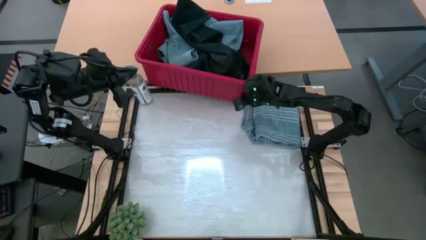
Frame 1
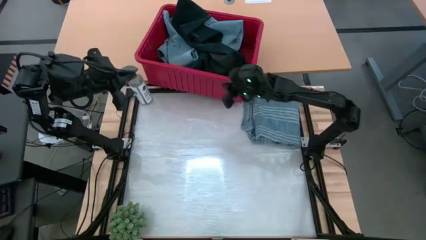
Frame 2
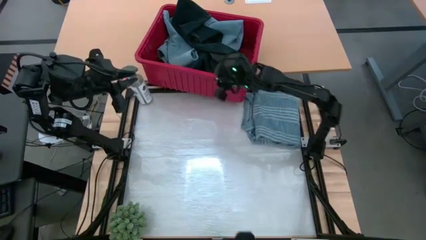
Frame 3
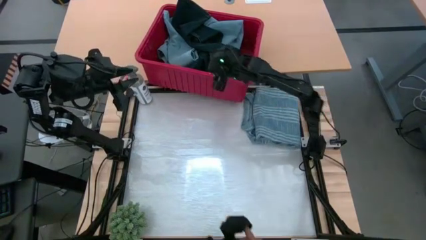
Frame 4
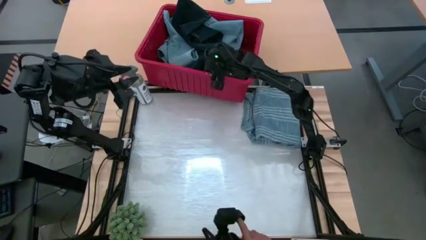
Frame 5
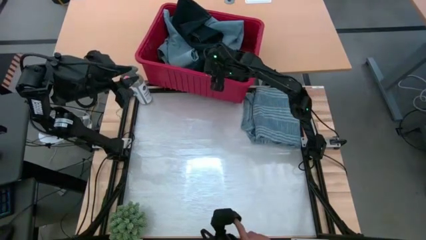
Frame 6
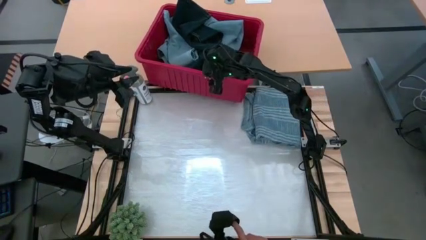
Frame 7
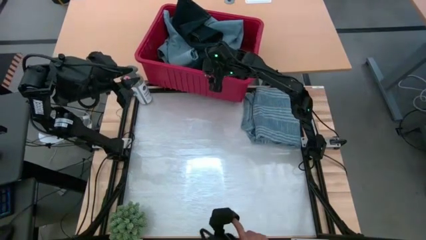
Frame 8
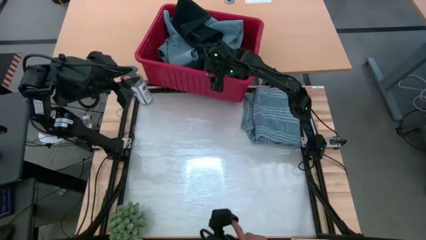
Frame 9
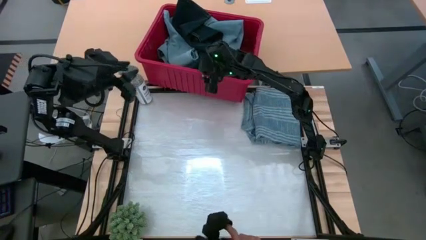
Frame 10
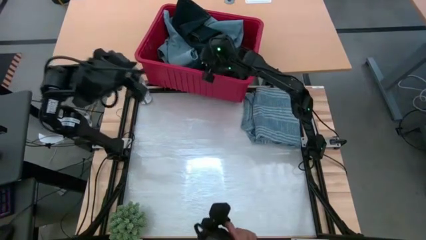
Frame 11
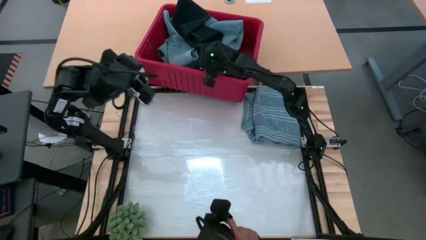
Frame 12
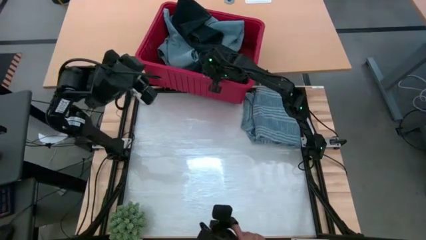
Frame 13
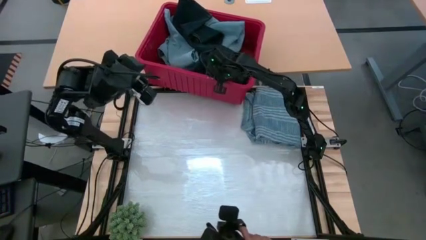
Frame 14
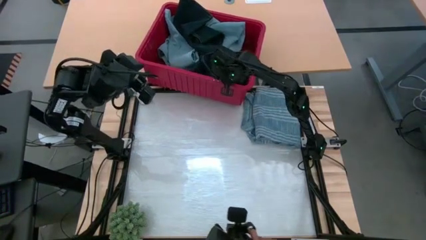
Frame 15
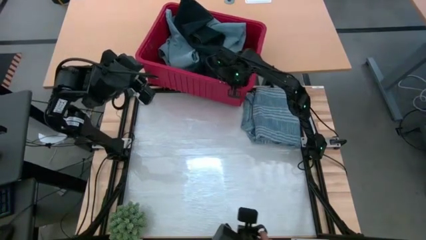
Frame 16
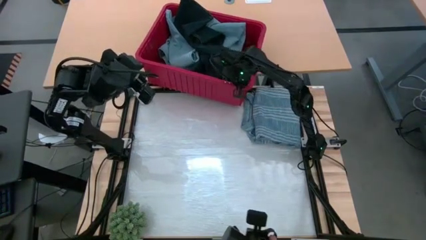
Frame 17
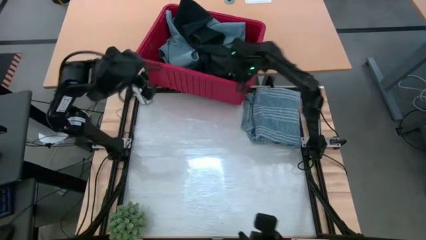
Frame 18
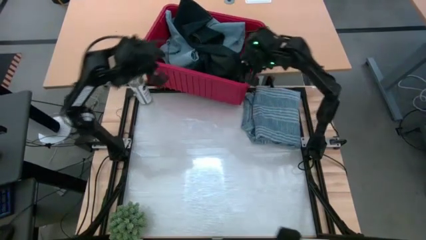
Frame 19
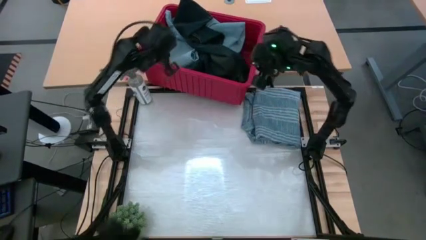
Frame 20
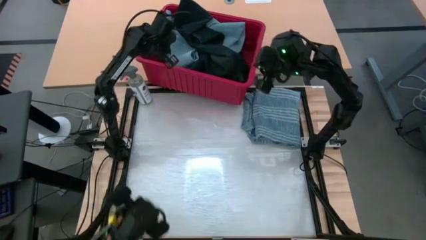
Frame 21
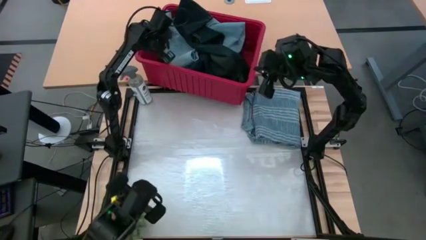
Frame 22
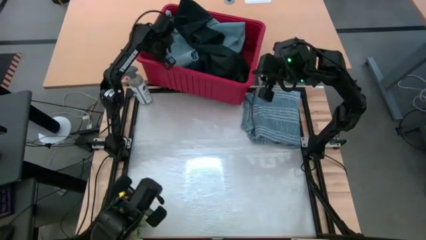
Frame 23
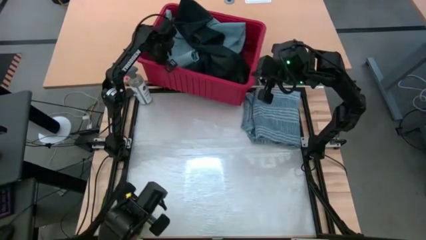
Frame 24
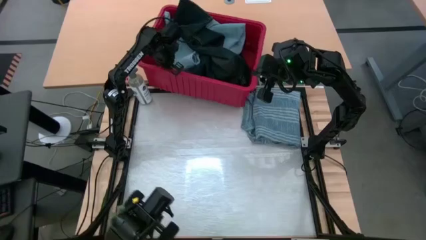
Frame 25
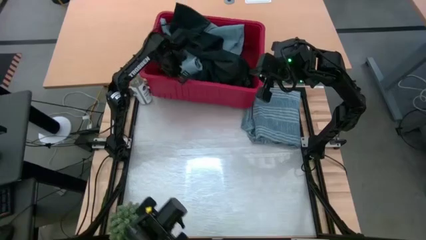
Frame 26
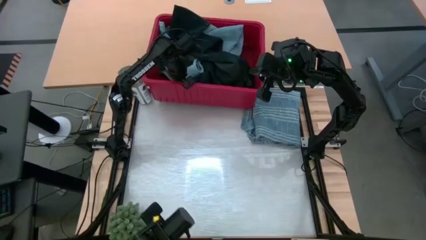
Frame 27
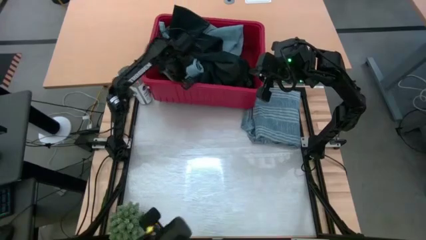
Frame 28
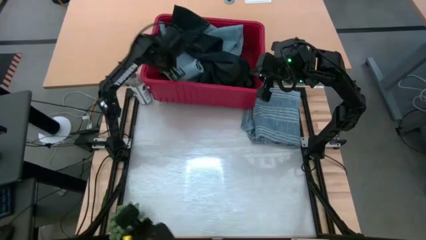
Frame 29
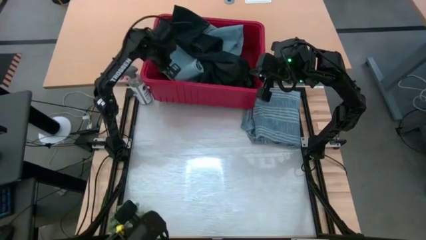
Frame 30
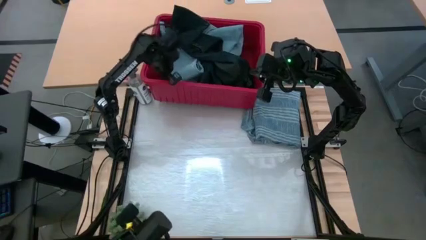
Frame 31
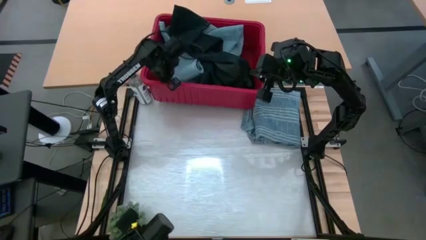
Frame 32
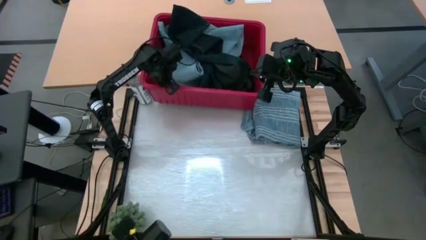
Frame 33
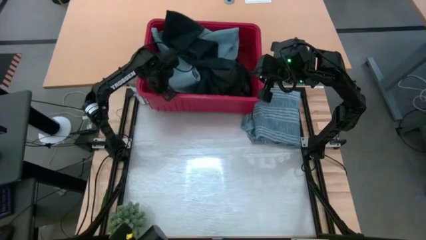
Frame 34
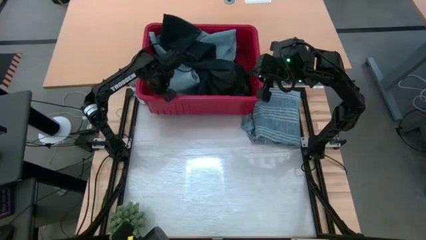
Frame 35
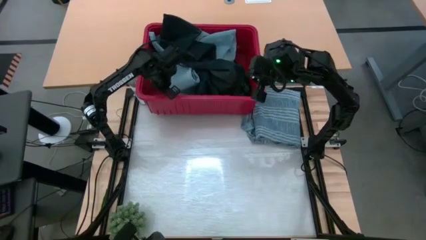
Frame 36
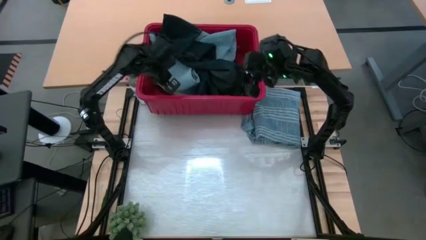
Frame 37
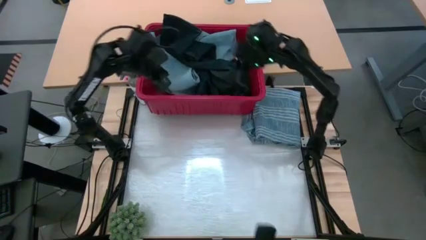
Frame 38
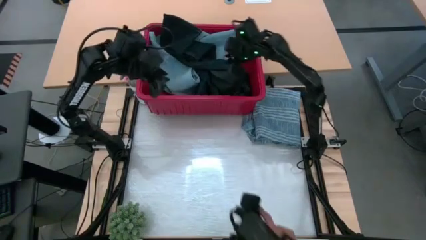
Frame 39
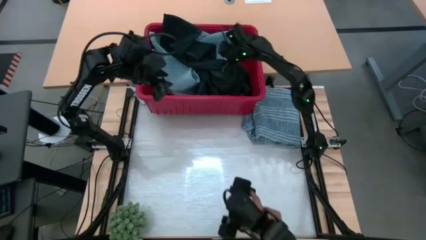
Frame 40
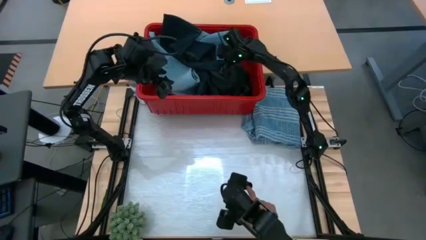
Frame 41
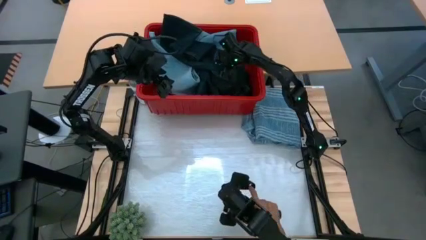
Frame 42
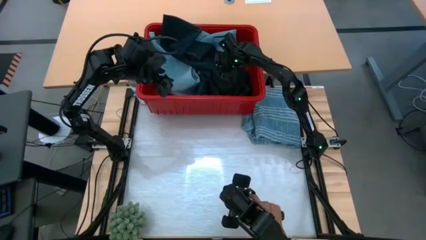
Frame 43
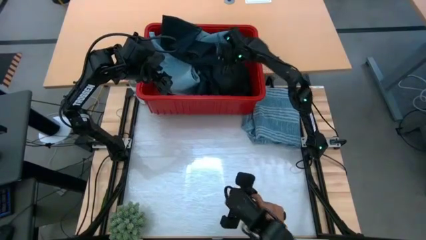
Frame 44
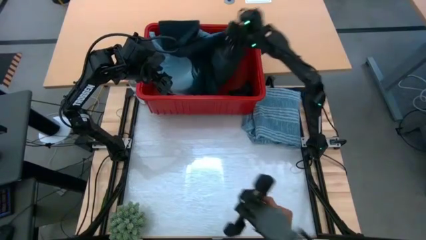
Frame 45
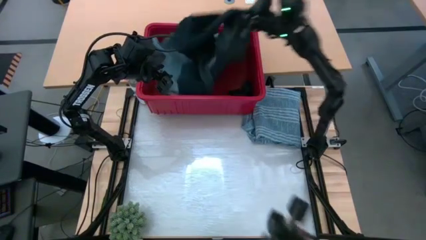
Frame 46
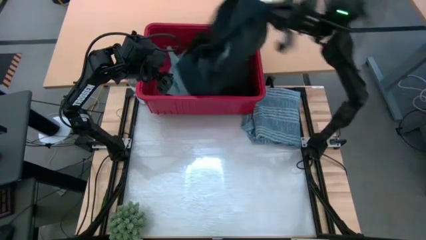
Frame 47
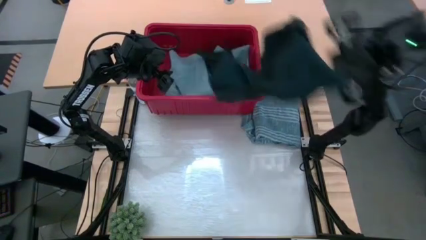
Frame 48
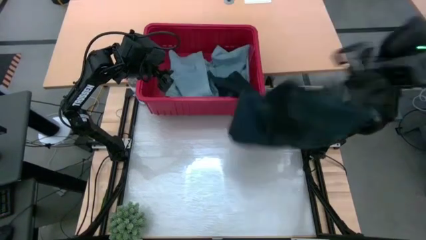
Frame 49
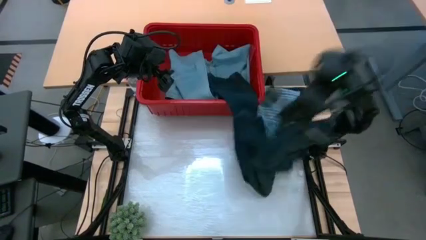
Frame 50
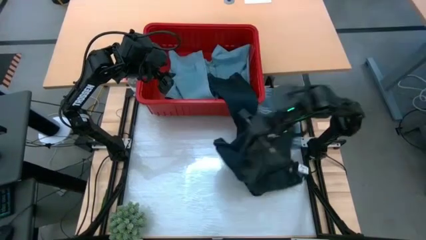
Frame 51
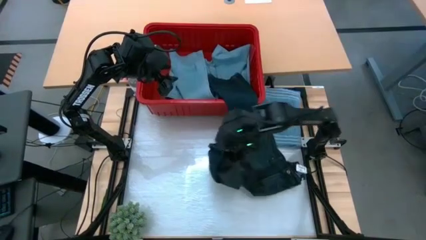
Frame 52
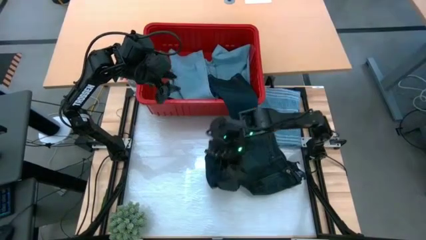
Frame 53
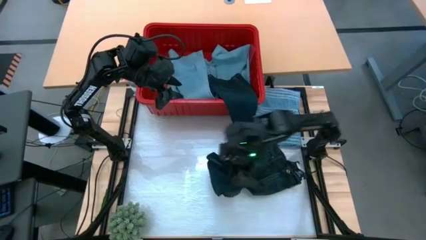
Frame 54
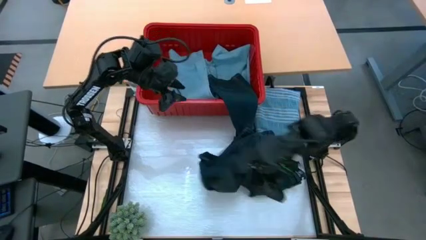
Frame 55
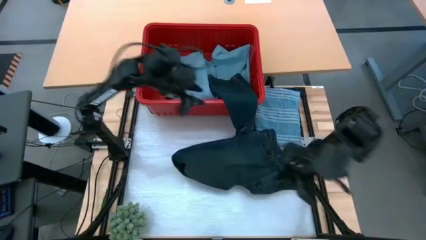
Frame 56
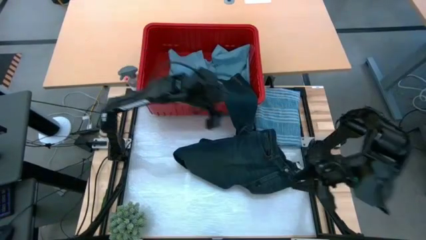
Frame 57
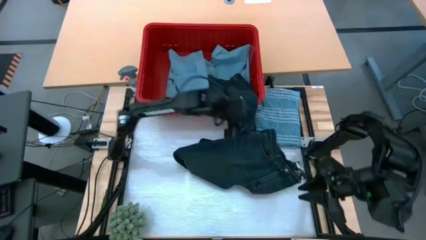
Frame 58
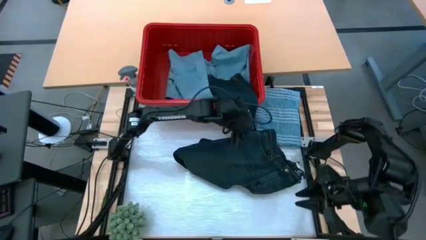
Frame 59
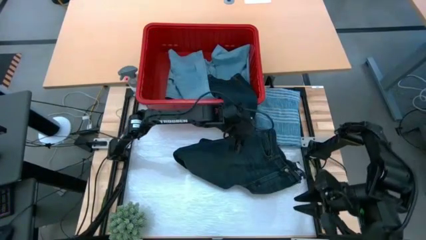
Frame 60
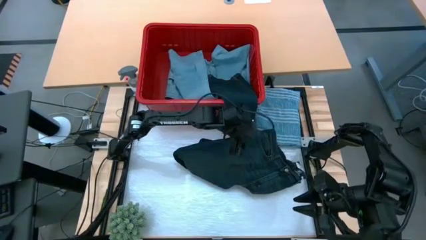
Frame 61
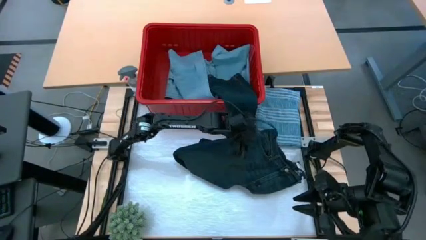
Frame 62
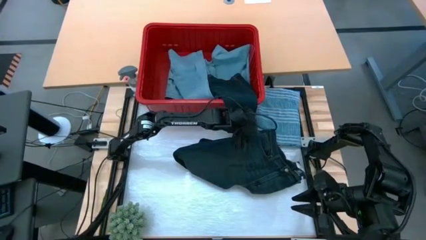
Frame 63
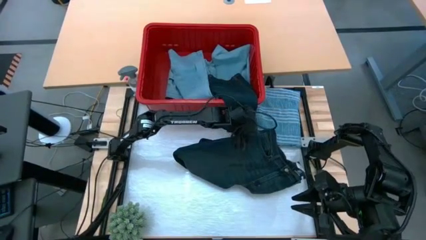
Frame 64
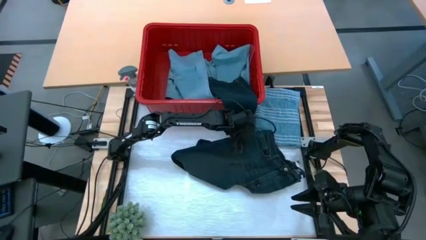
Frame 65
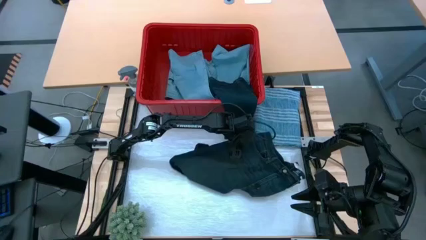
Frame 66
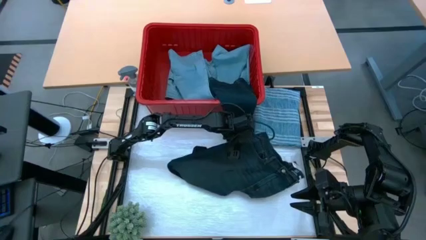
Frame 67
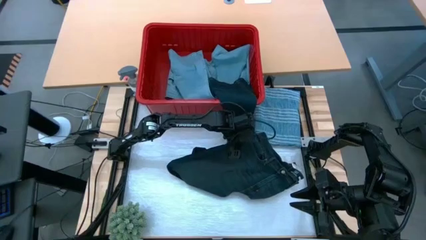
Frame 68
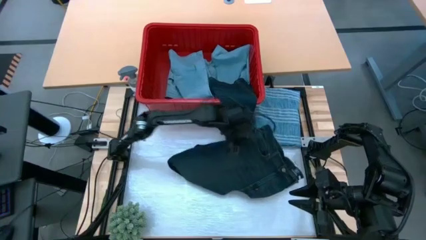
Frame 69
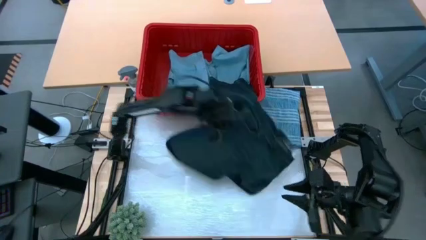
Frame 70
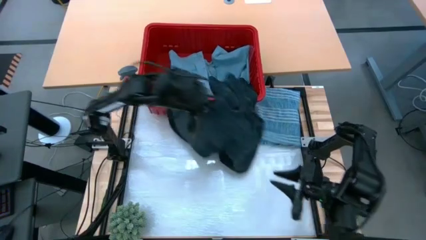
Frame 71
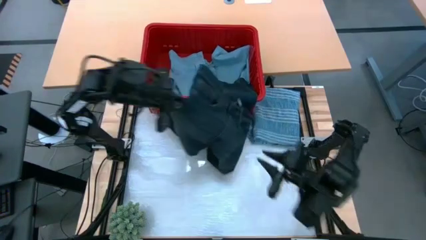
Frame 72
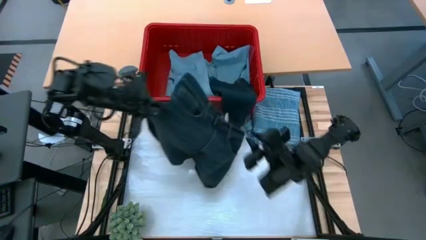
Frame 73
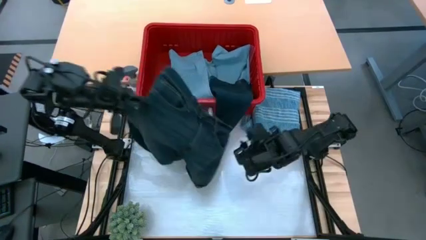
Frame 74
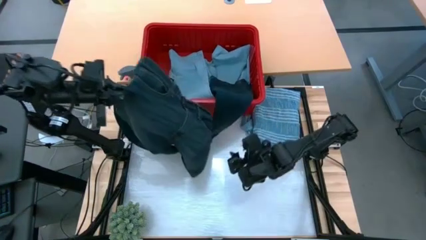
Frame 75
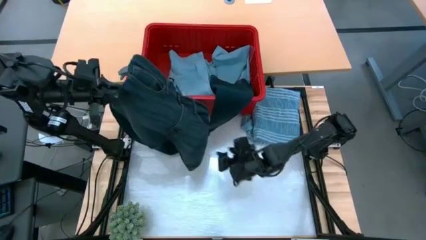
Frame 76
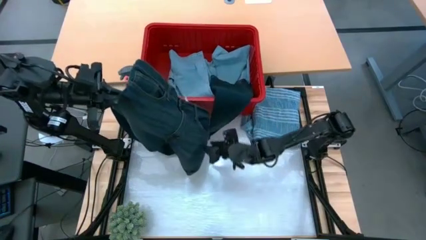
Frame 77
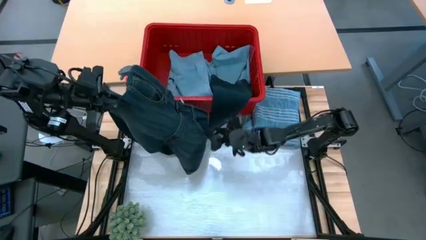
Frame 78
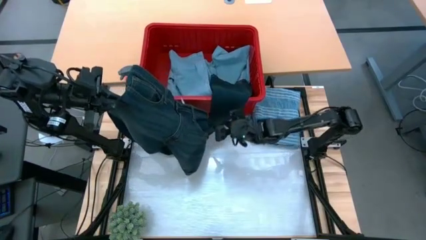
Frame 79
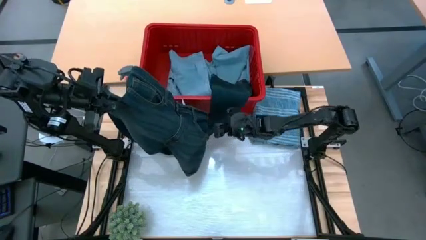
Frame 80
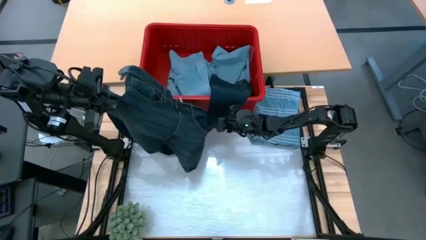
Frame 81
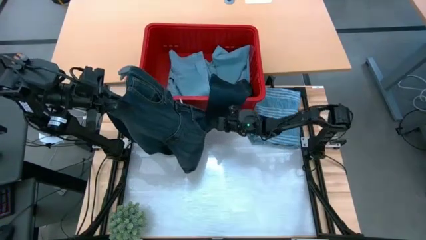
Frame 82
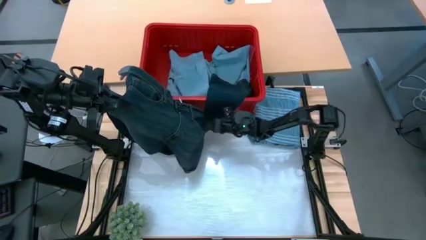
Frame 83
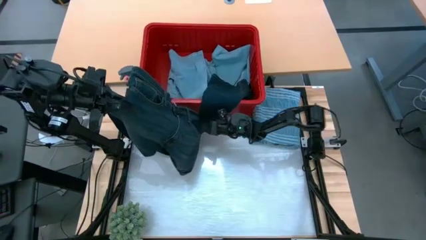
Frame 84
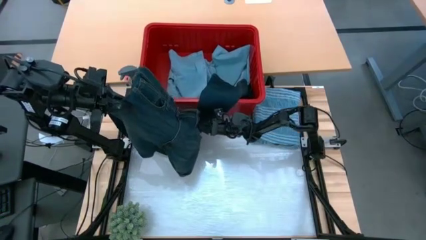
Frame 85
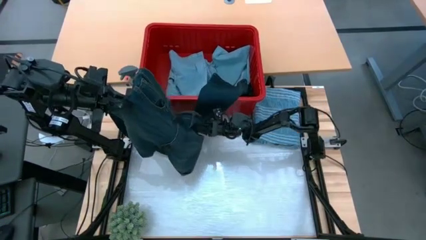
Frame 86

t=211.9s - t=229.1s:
Task: Fold Laundry from Bin
Fold the black pants
